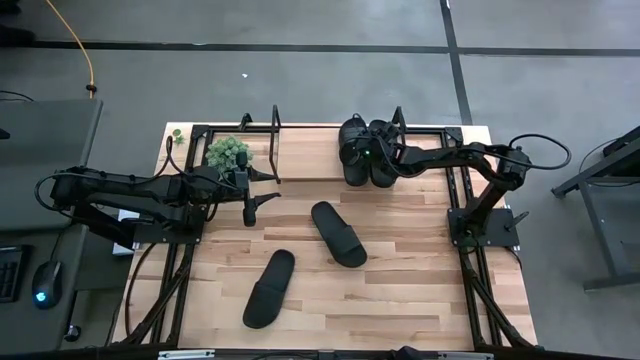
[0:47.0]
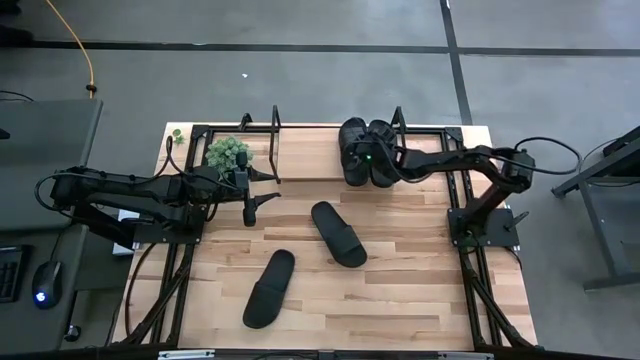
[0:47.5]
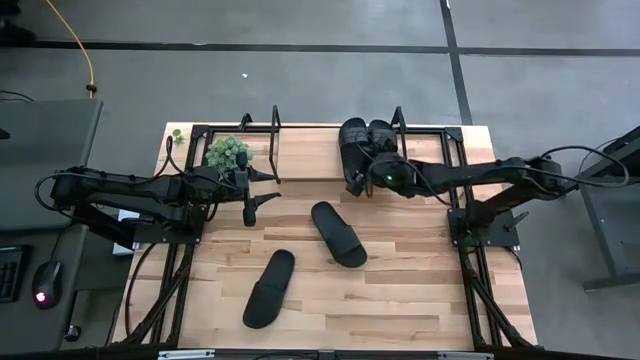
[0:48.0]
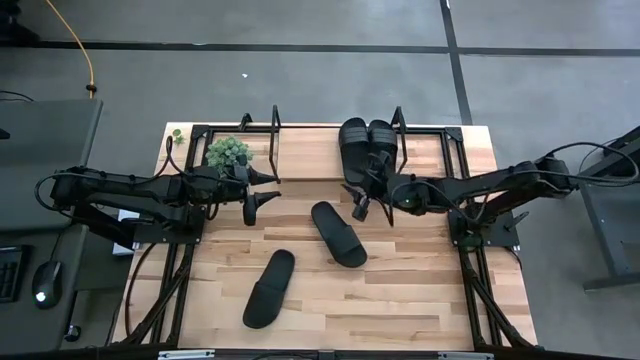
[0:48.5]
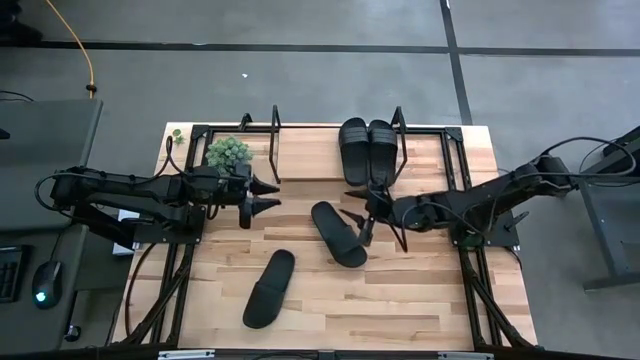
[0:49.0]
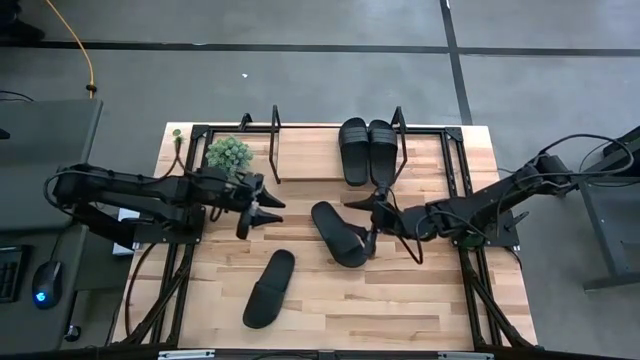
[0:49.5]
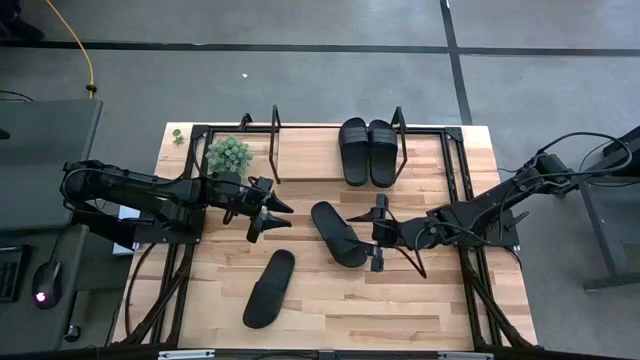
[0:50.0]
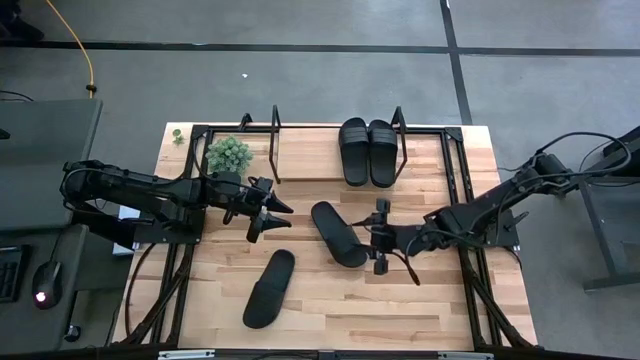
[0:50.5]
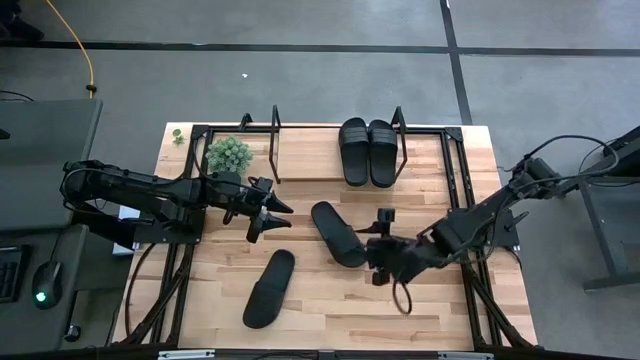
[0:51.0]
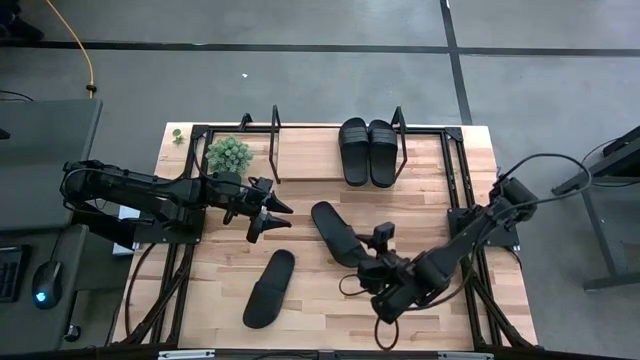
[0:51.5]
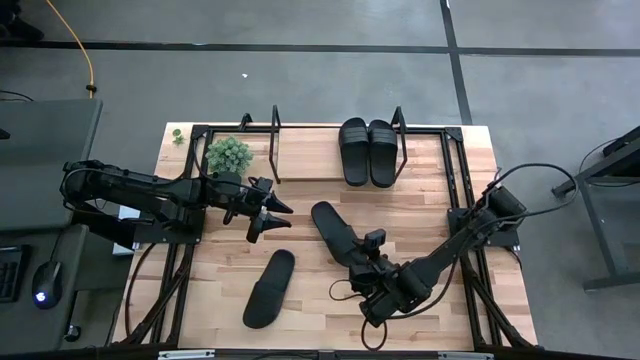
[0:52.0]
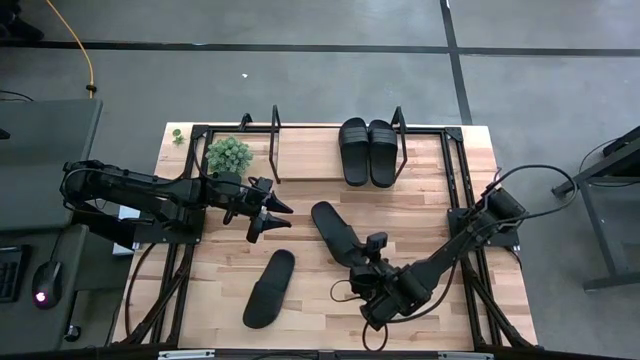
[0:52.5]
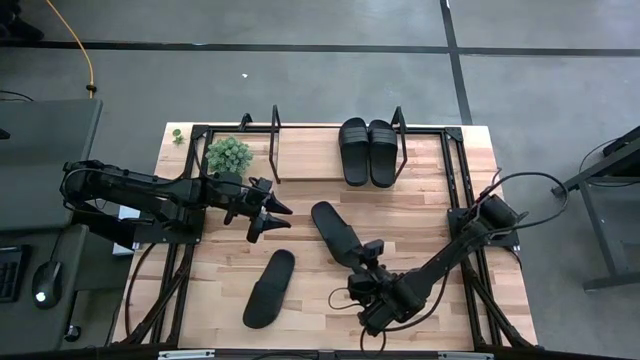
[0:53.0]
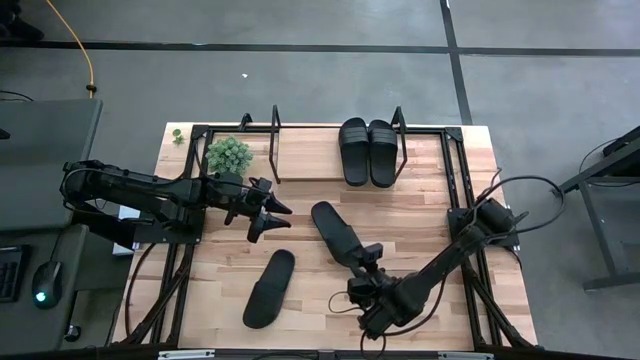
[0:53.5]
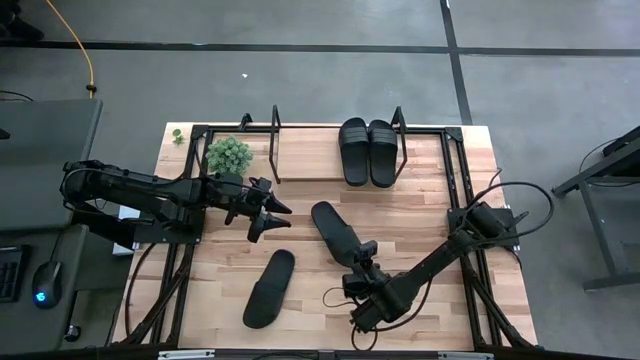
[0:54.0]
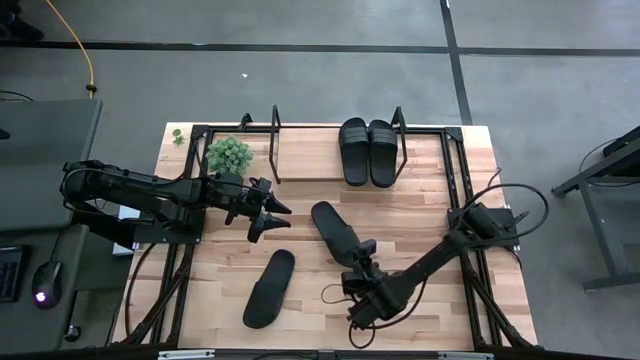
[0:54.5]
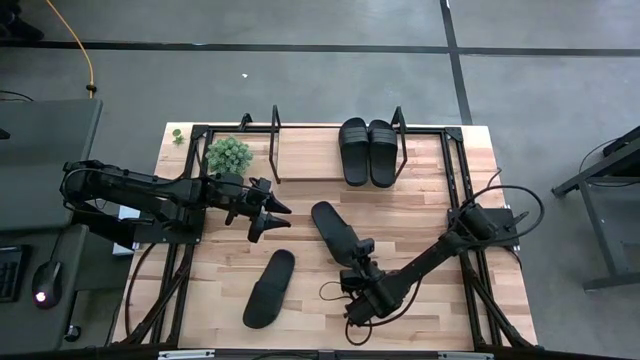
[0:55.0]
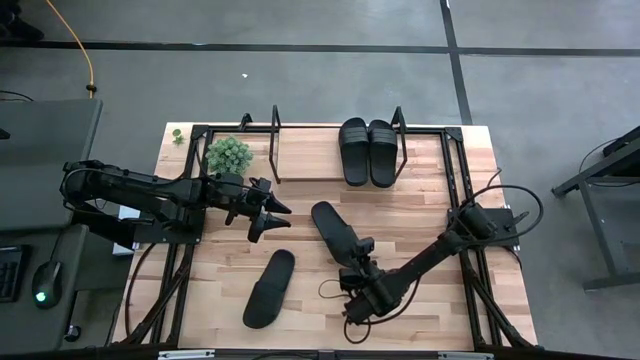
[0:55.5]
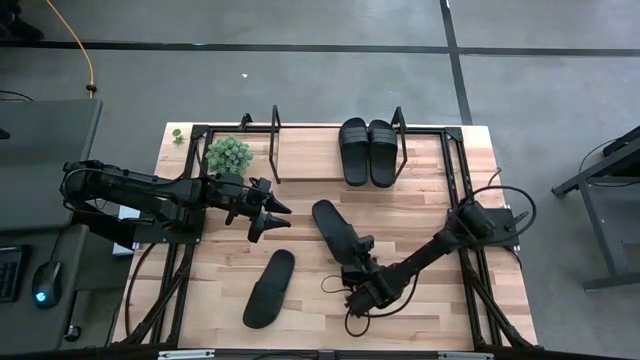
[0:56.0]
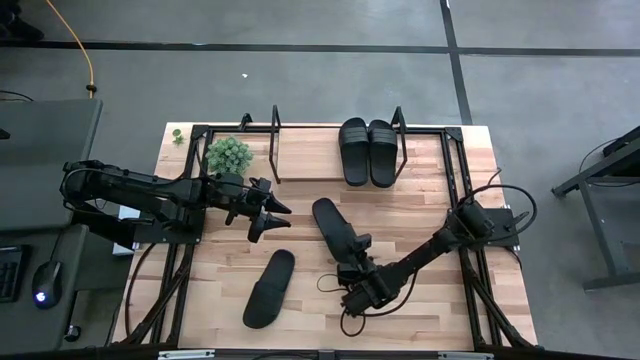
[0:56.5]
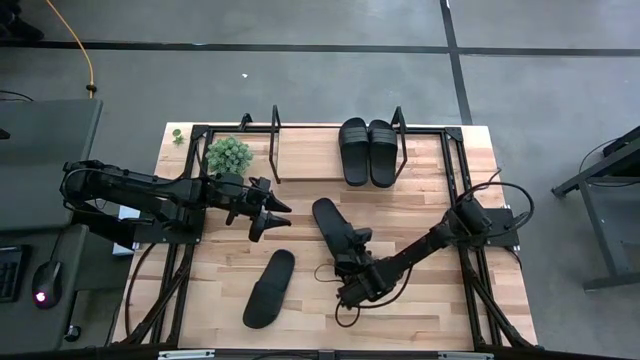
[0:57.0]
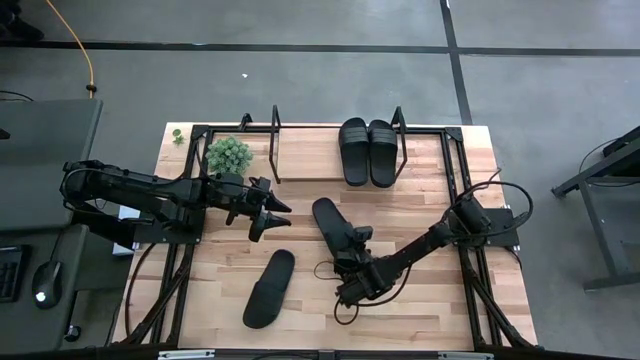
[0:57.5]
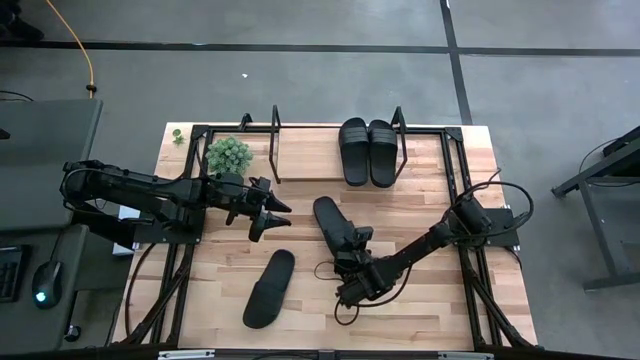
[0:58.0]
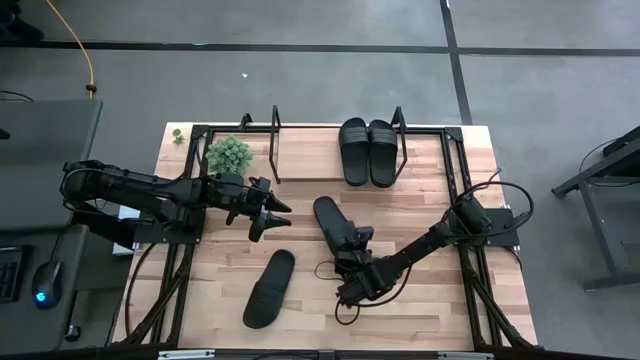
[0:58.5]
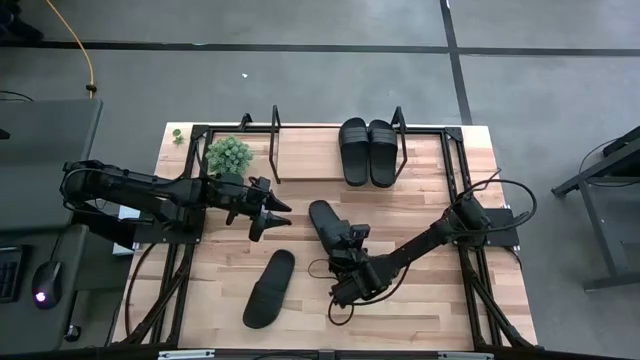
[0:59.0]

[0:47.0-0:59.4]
Task: Pick and place slides into the shelf
Put the black slide on the shelf

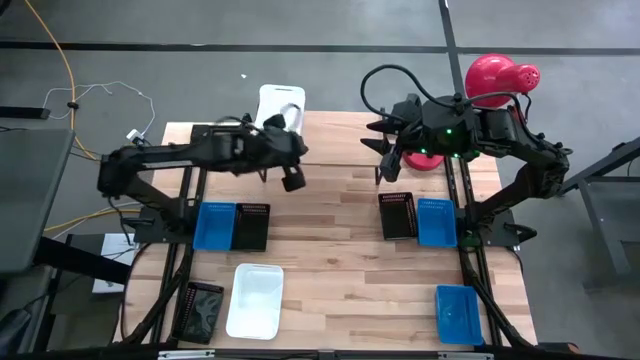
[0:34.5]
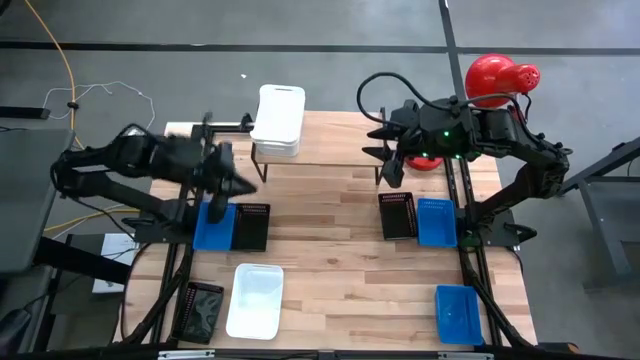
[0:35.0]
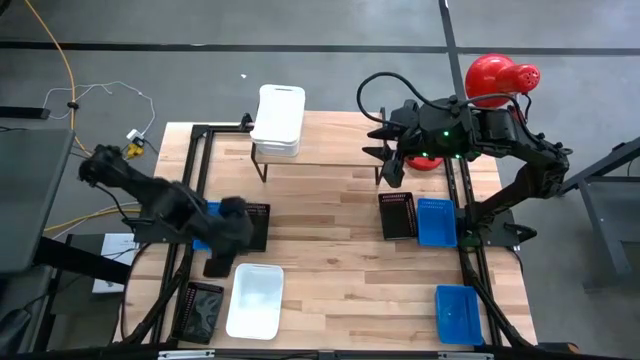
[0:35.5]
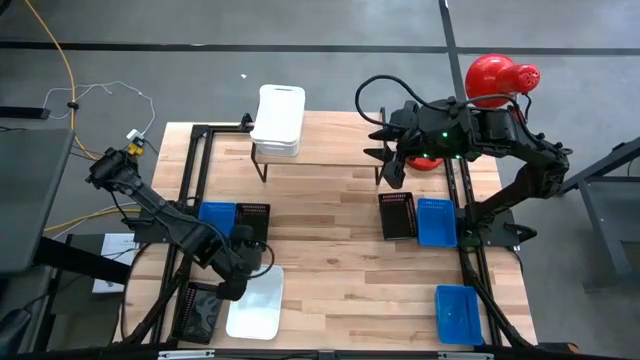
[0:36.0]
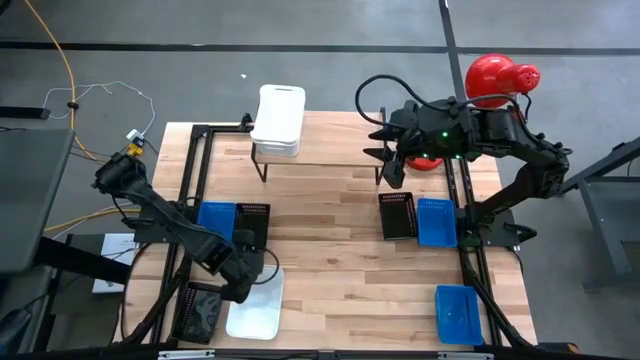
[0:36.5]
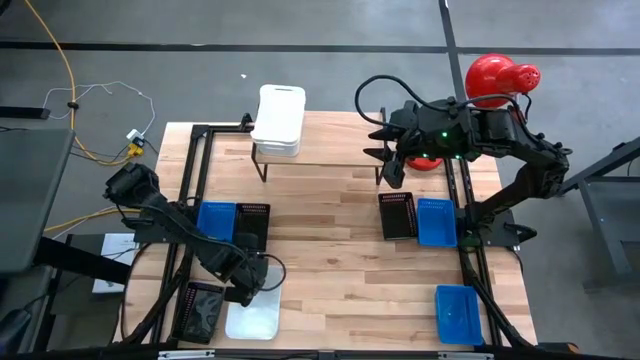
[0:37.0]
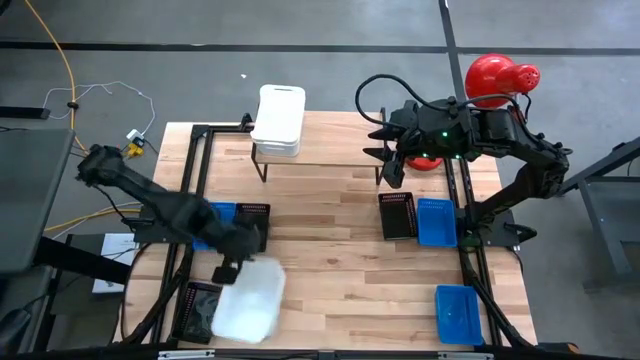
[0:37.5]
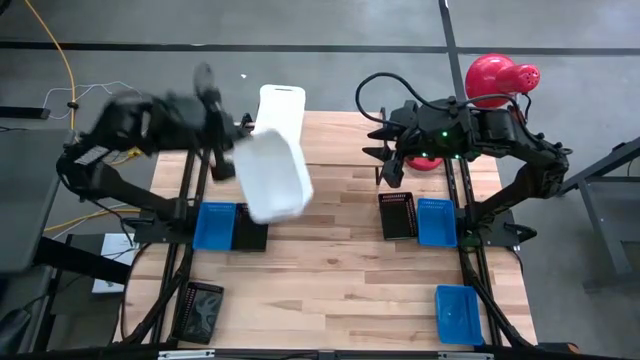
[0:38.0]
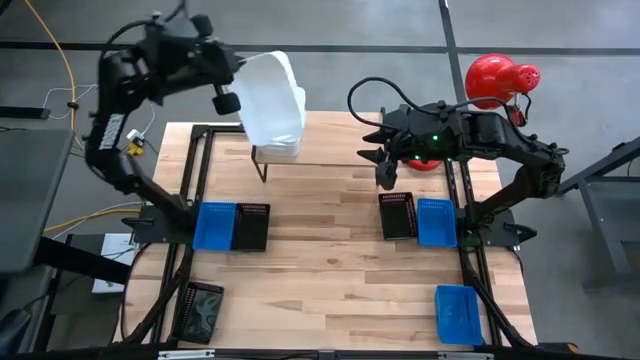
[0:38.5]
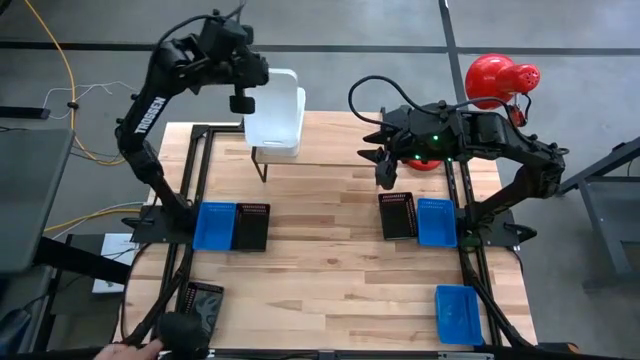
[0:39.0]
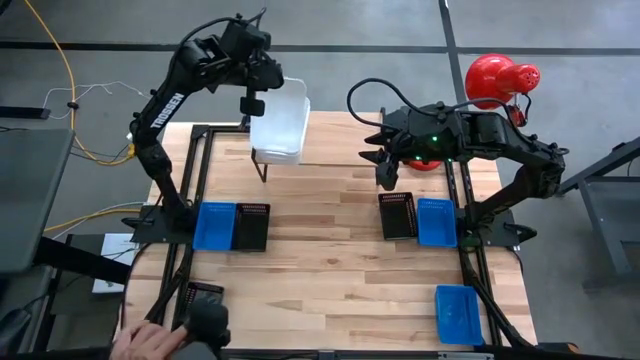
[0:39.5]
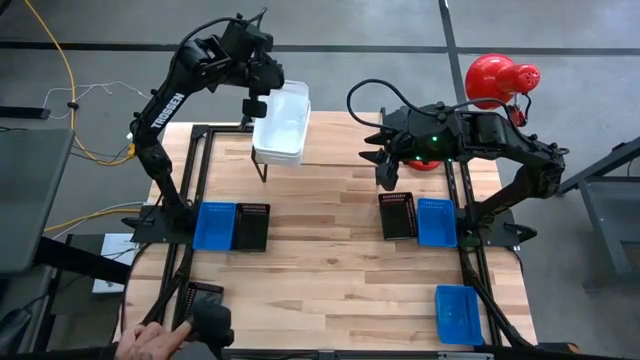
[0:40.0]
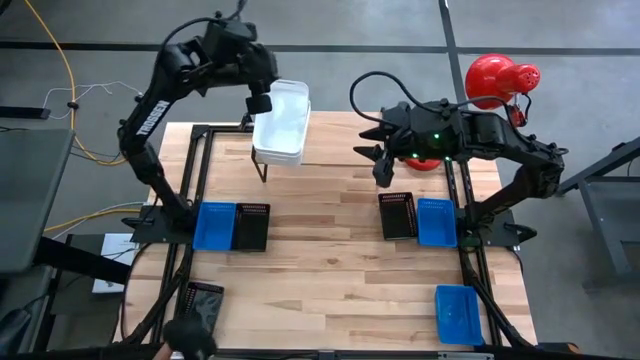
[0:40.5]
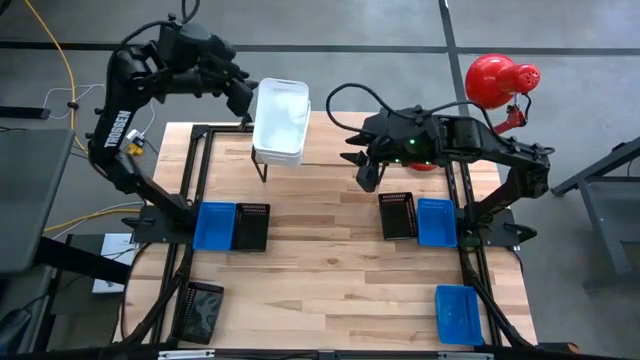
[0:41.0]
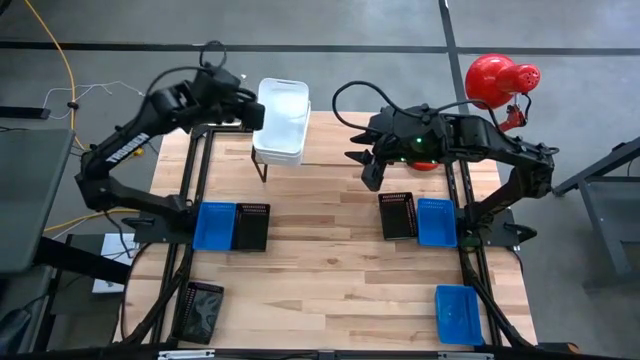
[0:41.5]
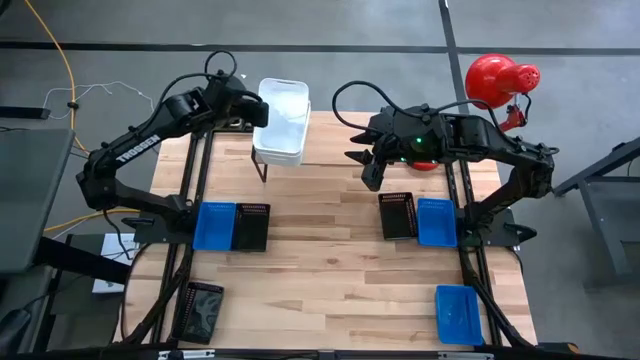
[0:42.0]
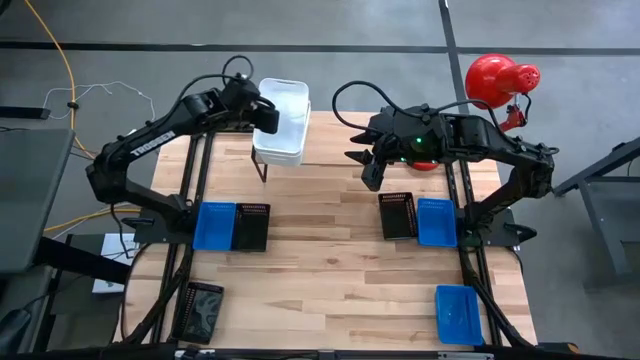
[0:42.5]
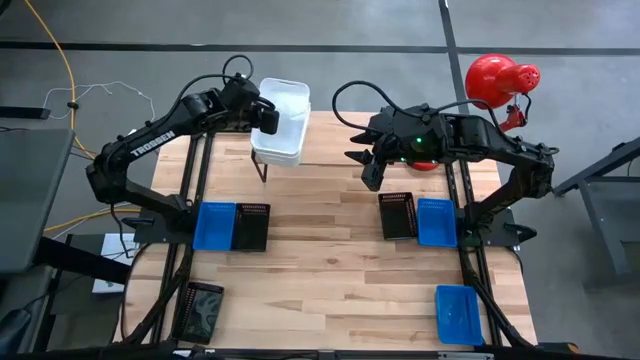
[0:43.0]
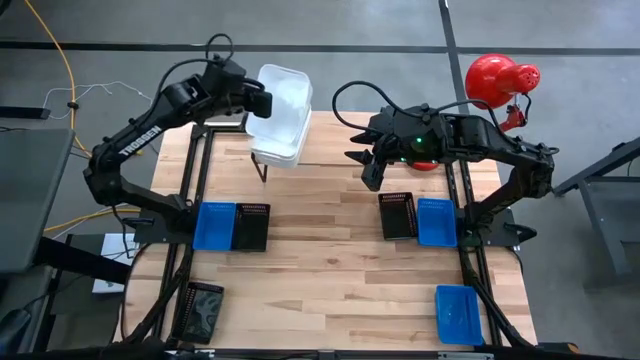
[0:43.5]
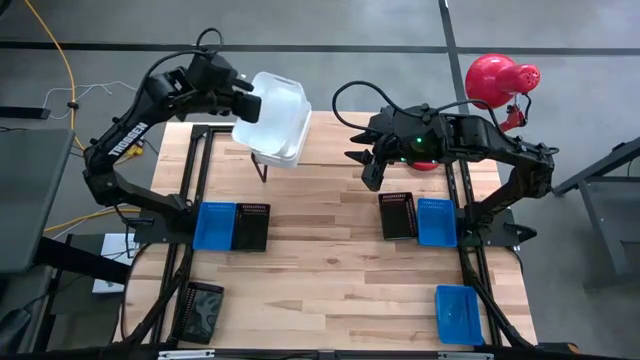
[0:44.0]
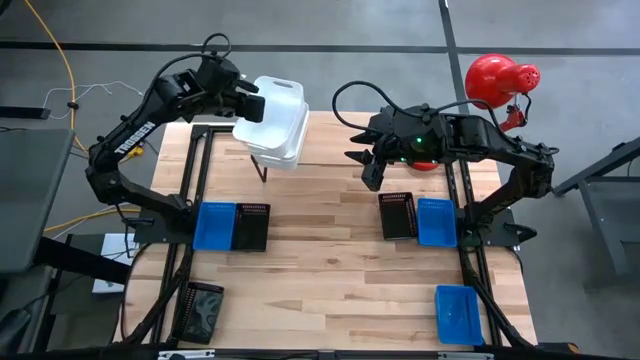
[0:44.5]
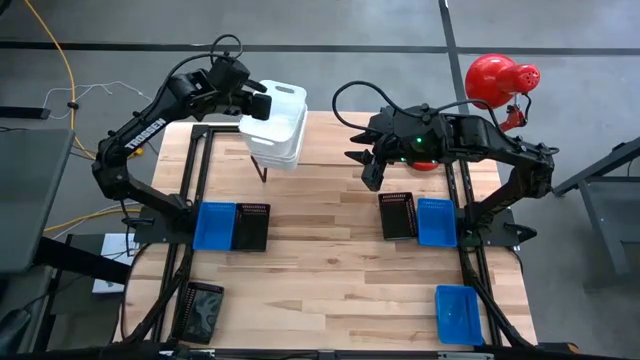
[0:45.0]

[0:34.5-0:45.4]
Task: Stack baskets on shelf by color
Stack the white bin on top of the white bins on the shelf
